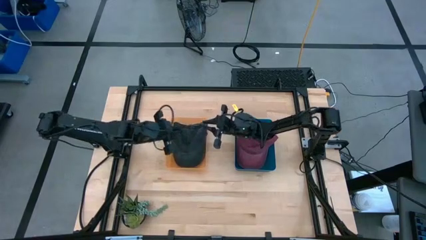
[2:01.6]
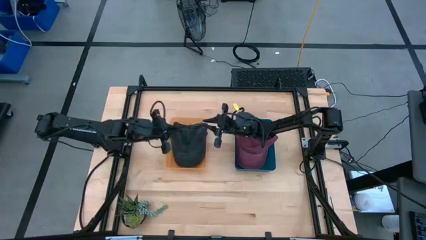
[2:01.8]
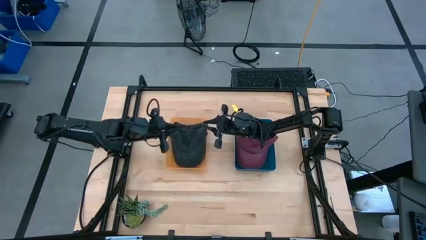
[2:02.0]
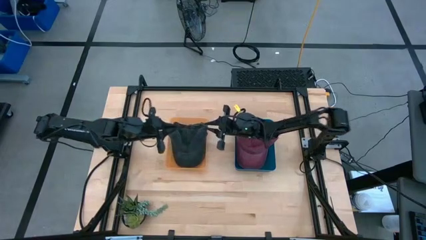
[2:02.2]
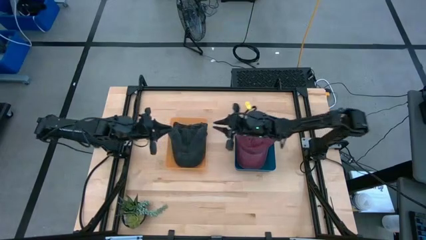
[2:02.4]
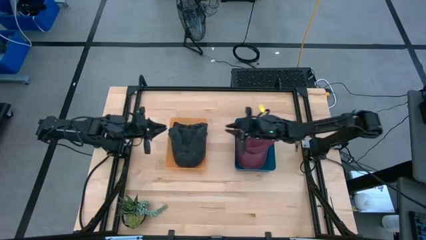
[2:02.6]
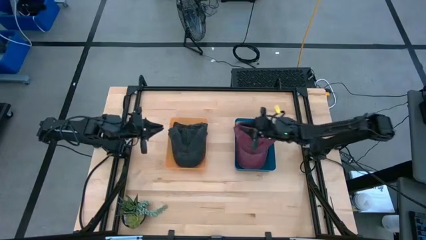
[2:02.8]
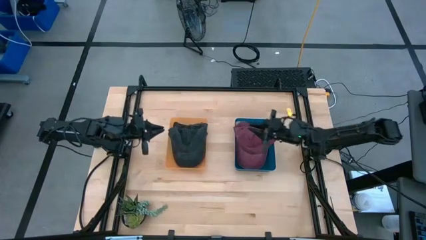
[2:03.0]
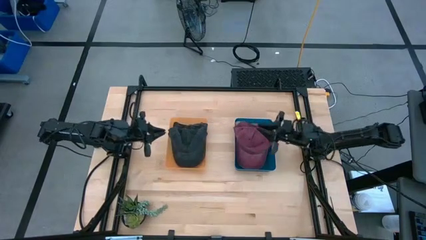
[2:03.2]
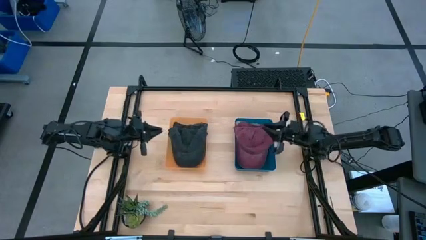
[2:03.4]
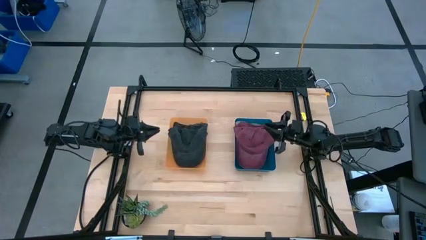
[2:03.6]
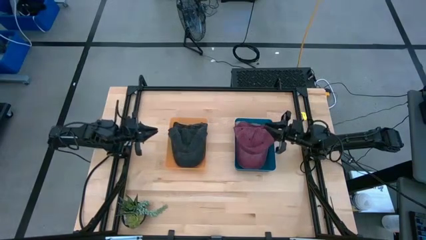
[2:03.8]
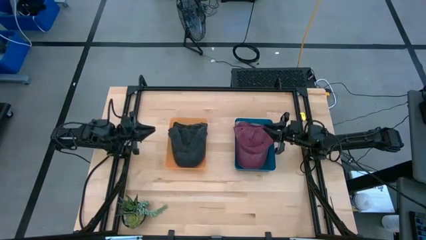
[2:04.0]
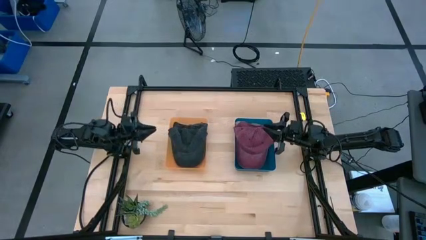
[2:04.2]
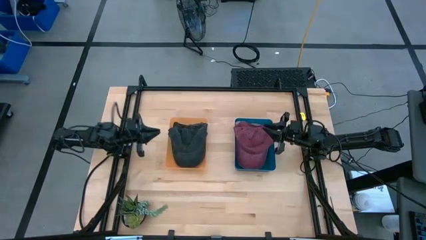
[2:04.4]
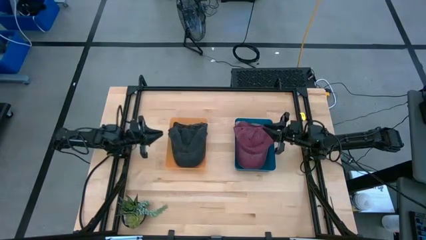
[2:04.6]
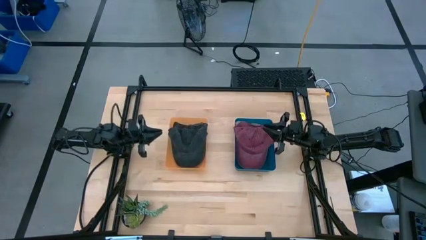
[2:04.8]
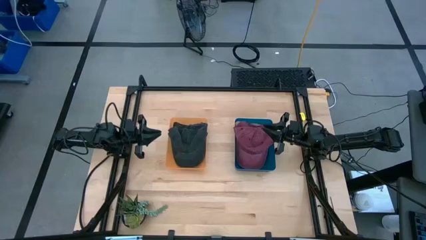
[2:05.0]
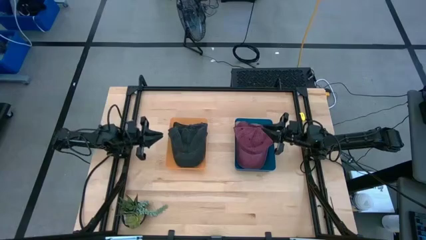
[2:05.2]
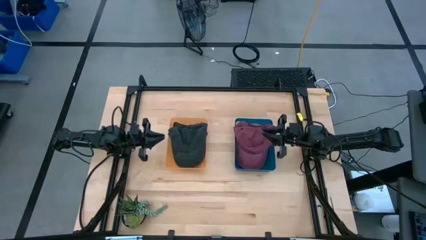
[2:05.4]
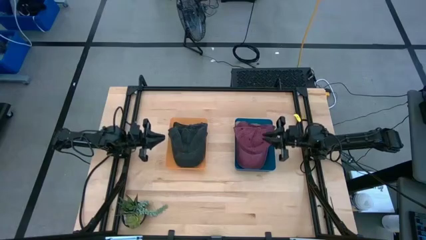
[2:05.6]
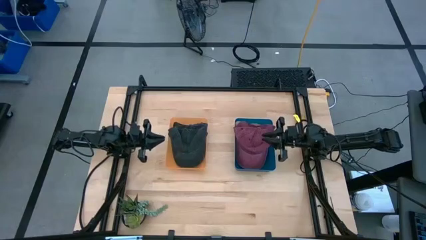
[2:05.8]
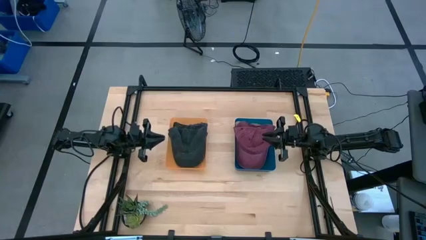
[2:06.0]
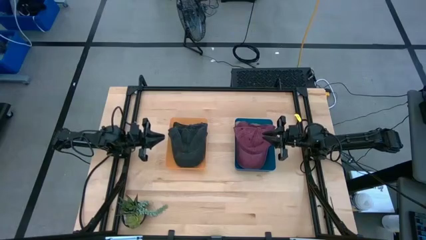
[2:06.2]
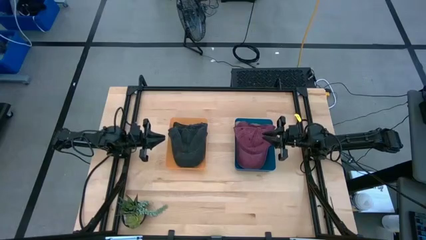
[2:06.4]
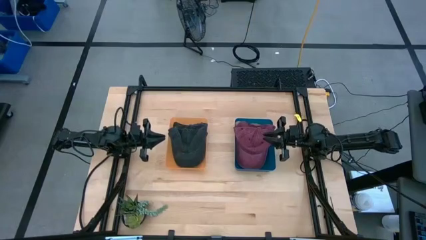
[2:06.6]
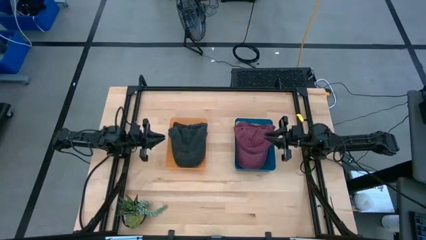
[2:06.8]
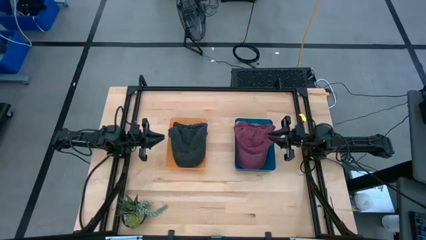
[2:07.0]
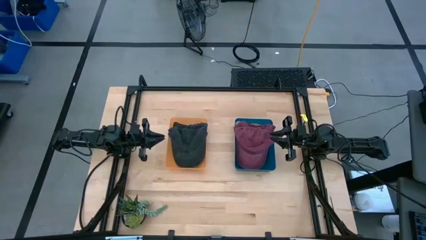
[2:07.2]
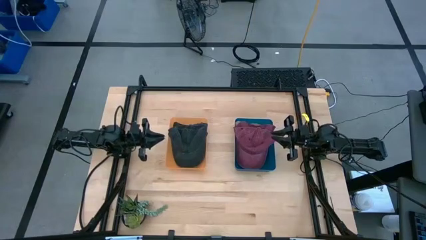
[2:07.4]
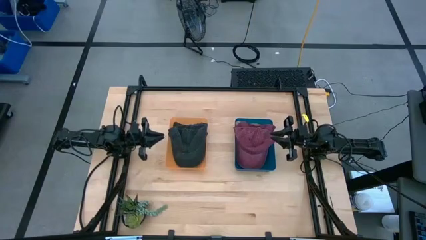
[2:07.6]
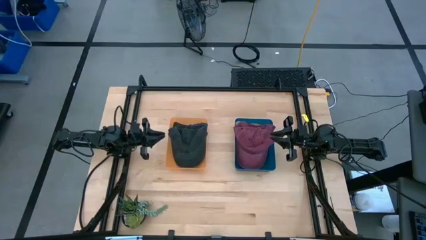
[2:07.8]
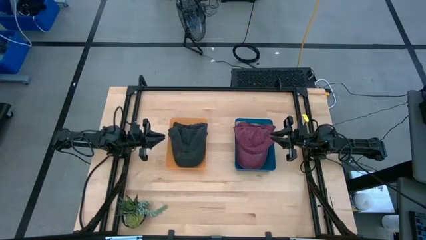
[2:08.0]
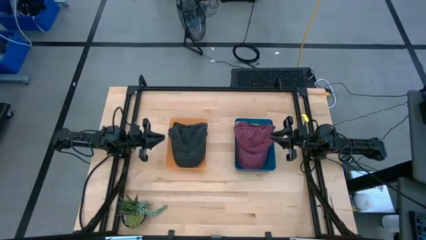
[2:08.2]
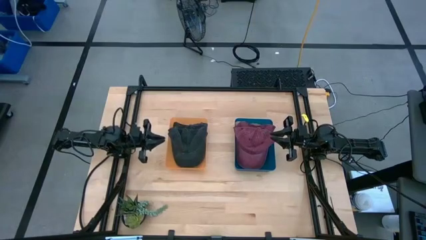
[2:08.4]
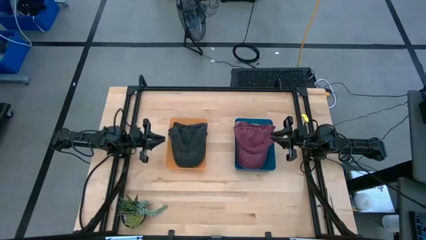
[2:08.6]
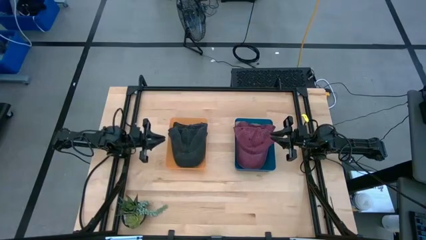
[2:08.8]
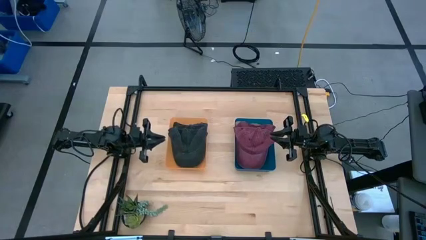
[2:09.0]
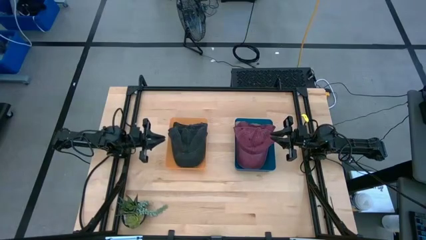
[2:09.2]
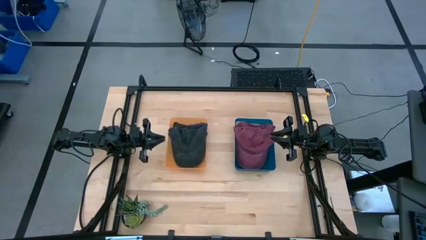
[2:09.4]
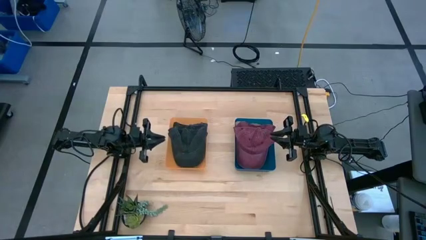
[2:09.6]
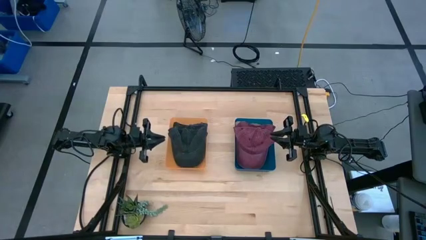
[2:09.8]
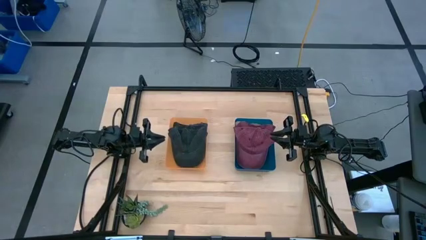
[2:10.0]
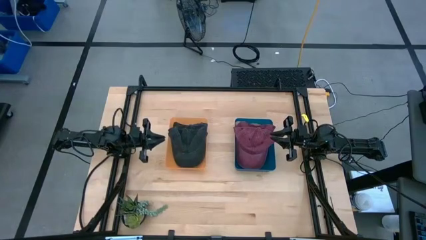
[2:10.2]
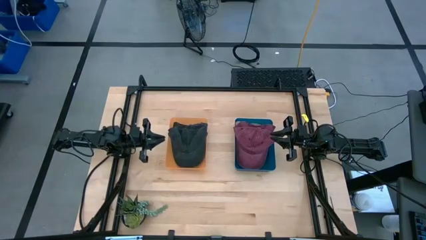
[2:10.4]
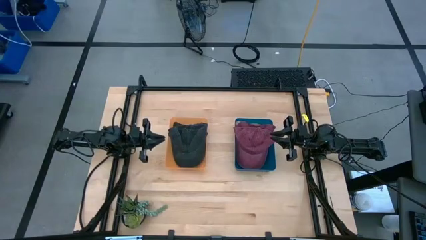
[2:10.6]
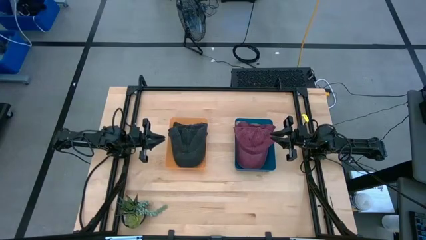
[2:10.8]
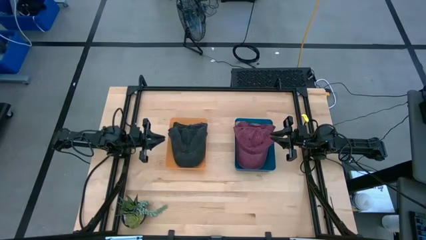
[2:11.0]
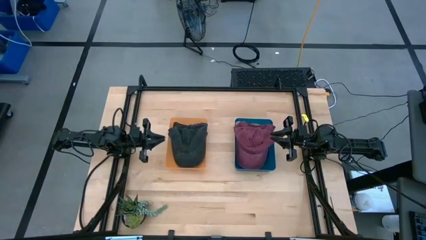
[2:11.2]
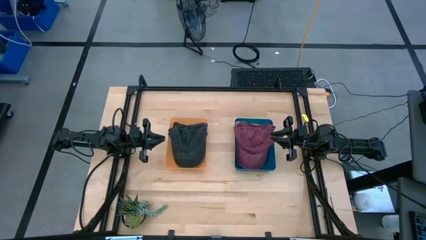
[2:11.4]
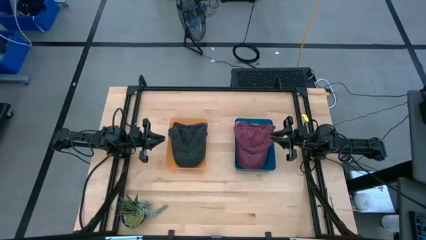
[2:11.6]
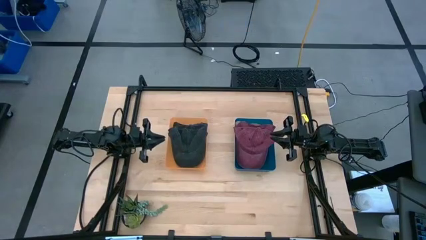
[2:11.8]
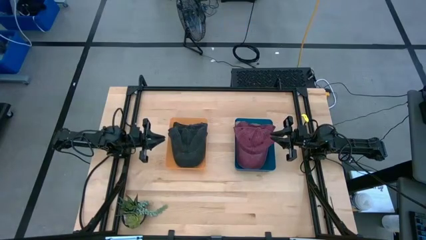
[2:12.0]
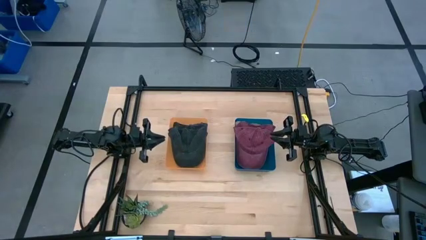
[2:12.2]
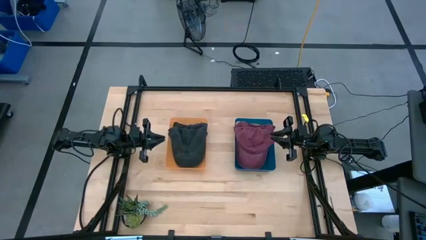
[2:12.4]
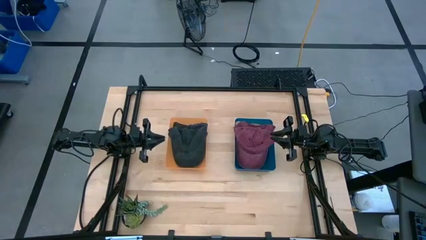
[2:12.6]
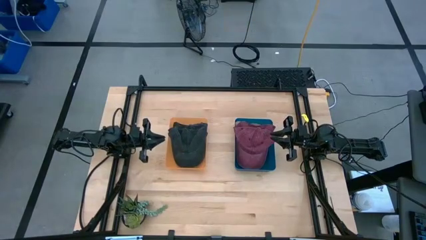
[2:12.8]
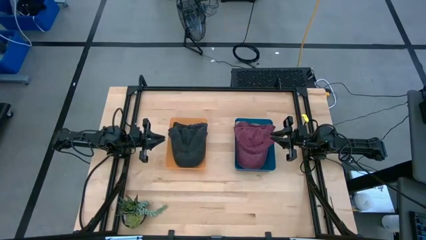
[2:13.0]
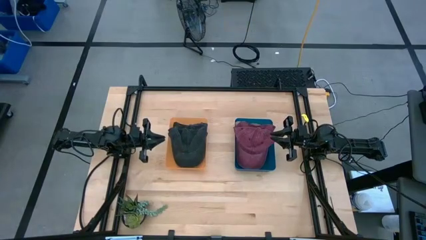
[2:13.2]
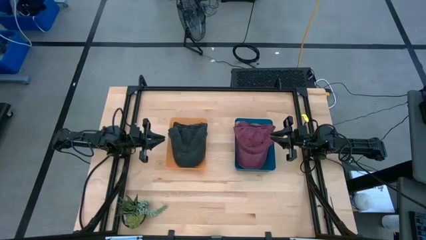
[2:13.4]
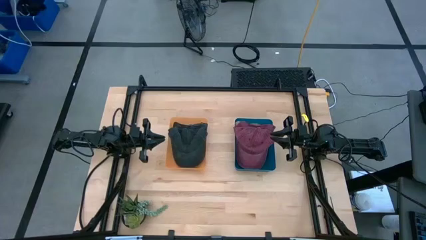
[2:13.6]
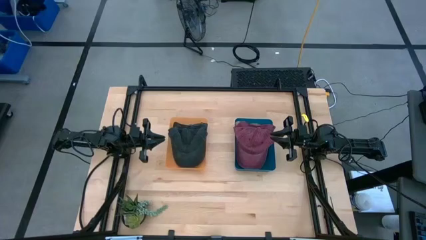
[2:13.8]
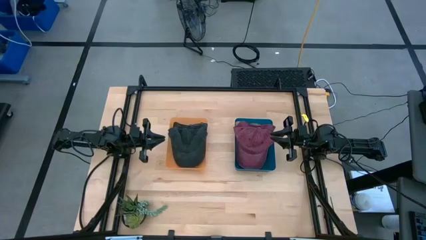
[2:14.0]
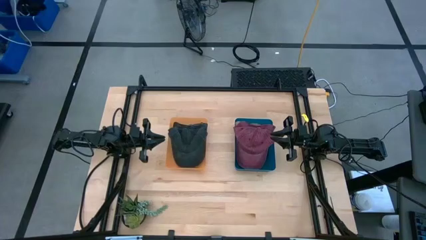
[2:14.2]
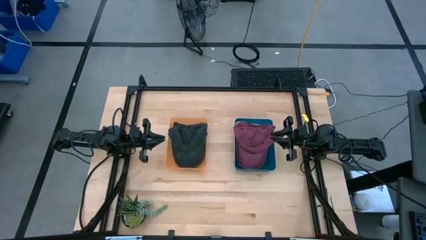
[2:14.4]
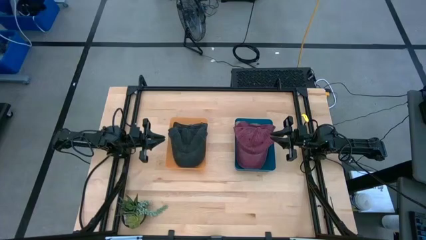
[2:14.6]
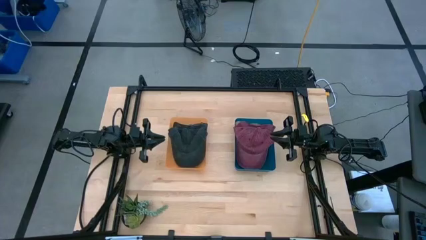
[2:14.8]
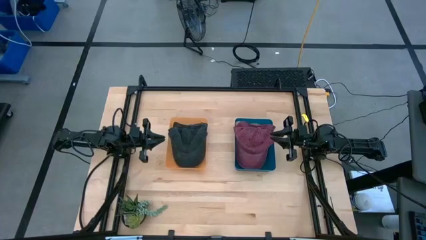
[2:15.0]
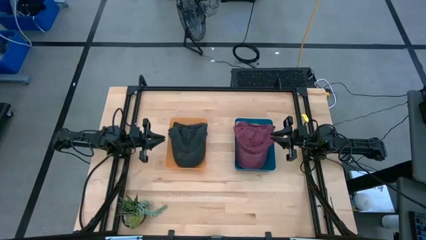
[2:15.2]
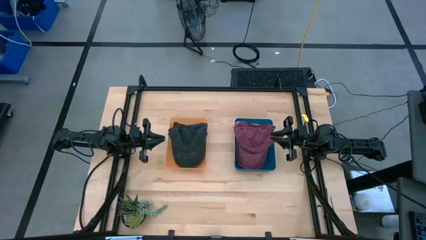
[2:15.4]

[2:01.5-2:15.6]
Task: Pick & Place hat
Return to Home Position

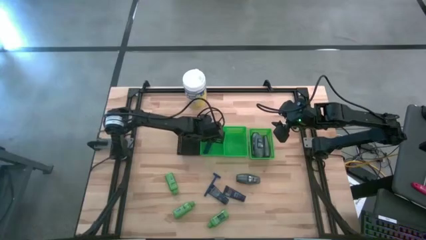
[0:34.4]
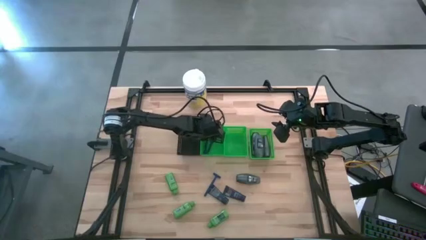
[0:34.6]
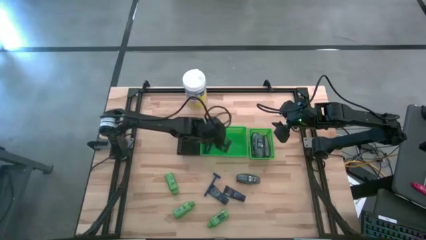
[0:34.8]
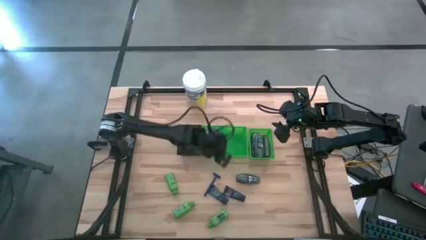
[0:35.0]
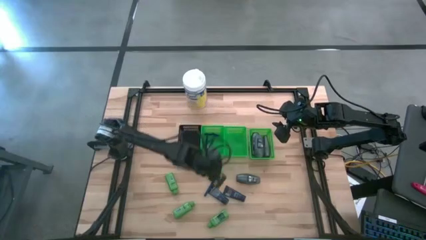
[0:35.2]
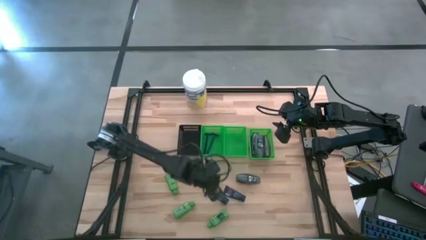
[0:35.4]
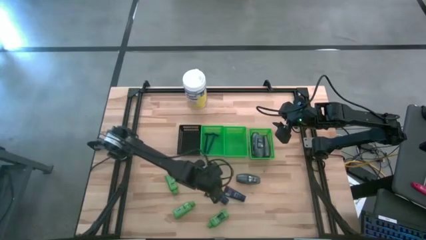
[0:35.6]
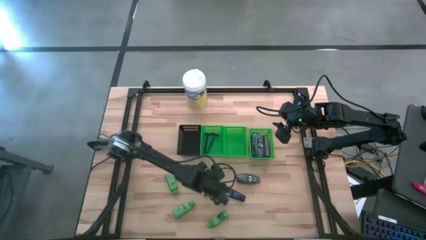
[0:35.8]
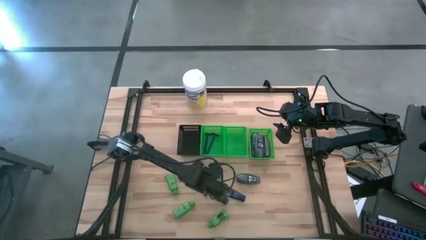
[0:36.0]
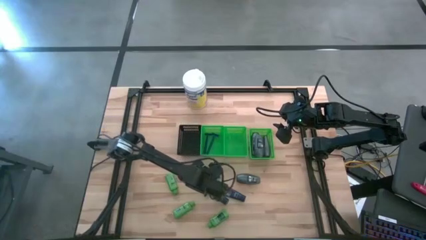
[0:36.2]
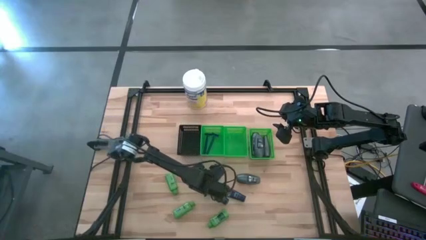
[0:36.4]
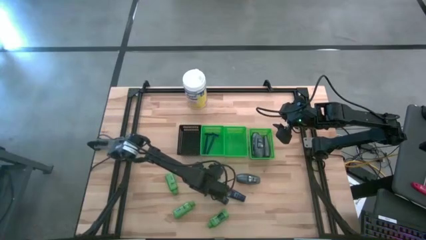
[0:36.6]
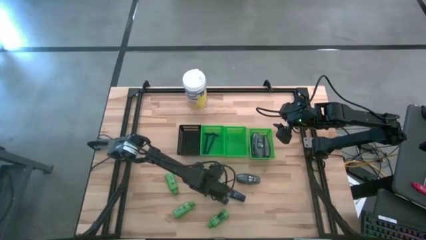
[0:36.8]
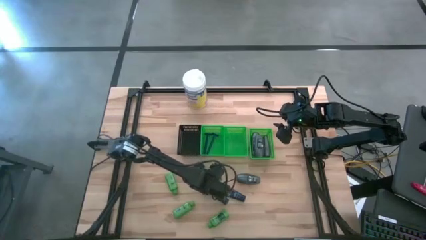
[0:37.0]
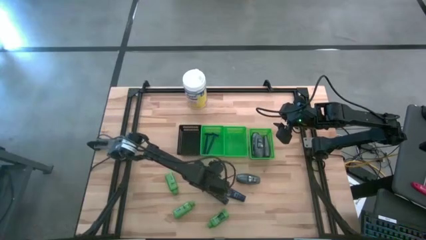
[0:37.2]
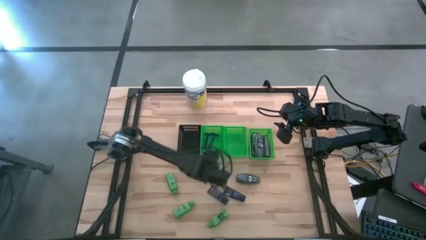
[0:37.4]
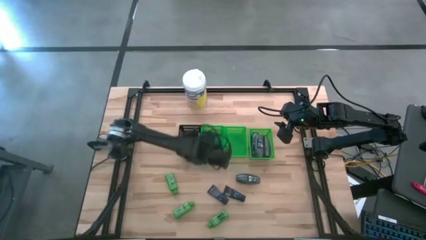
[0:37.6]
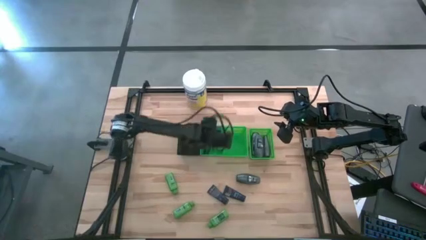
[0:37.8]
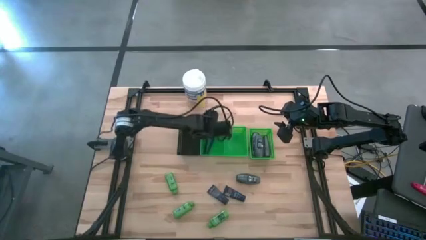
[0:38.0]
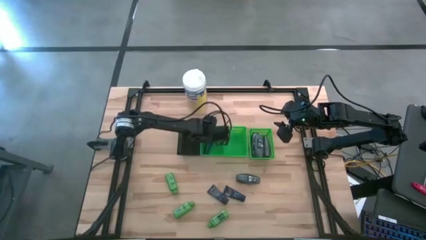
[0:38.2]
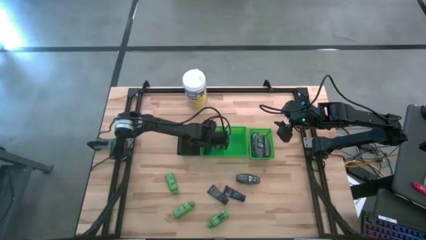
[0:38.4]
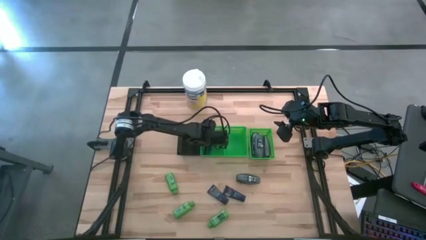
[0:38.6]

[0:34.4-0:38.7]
Task: Pick & Place Travel size toiletries
Put the razor into the left green bin
